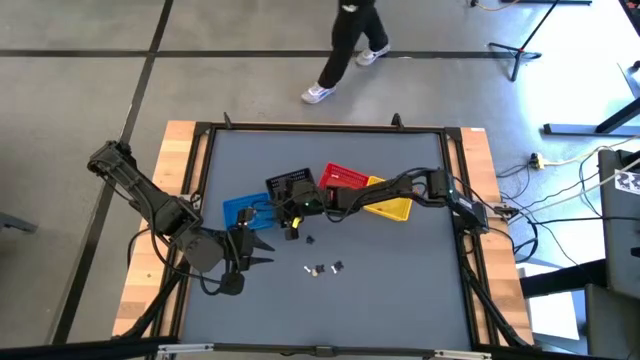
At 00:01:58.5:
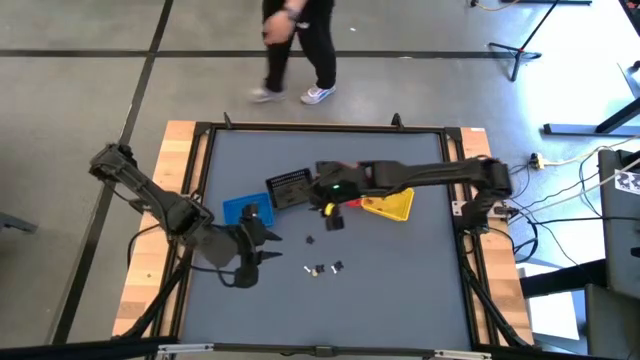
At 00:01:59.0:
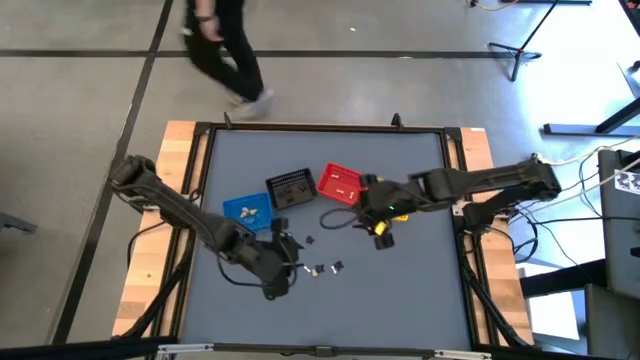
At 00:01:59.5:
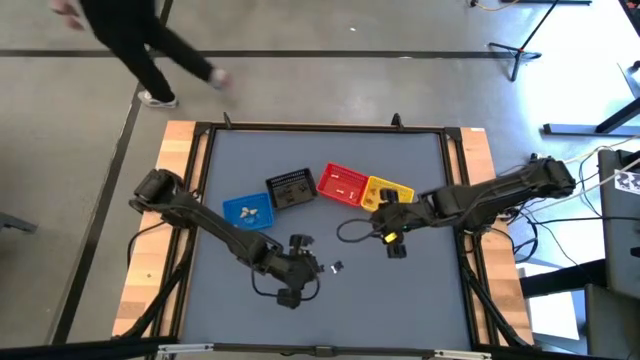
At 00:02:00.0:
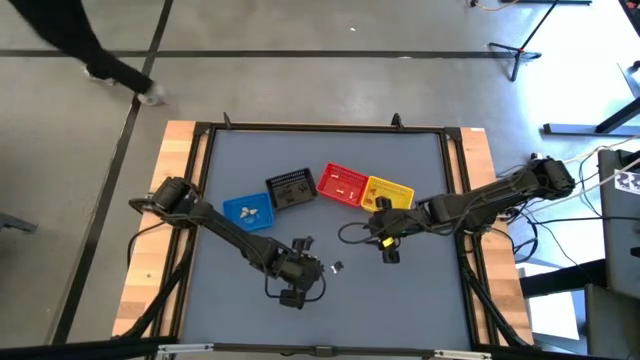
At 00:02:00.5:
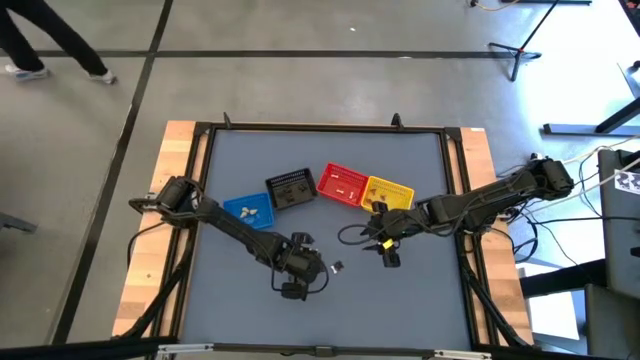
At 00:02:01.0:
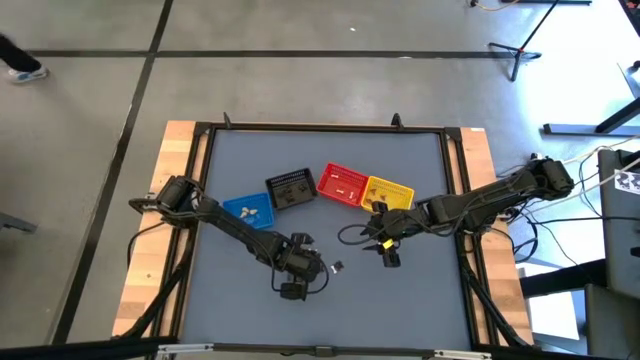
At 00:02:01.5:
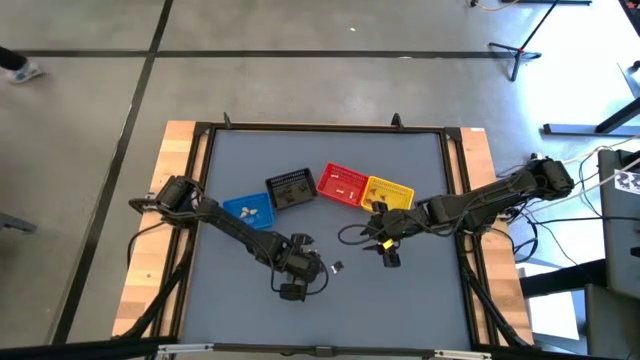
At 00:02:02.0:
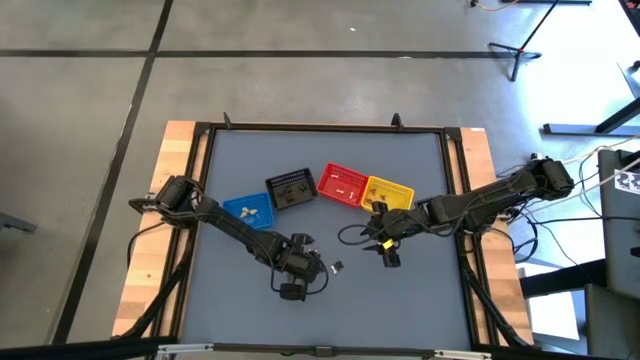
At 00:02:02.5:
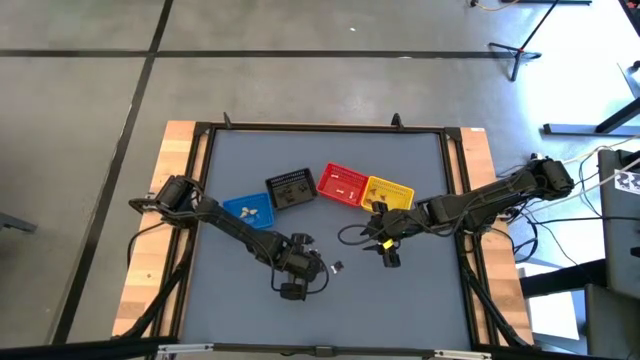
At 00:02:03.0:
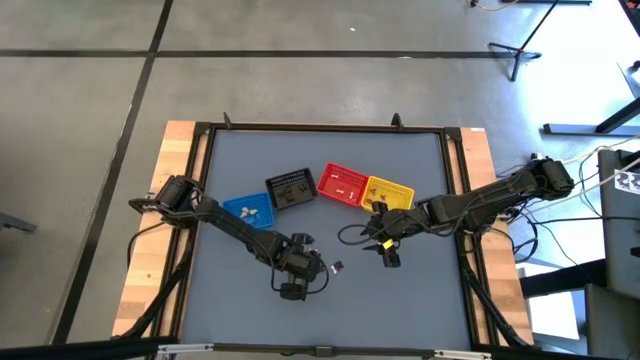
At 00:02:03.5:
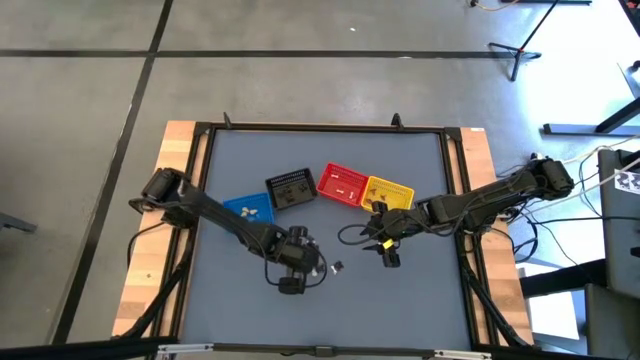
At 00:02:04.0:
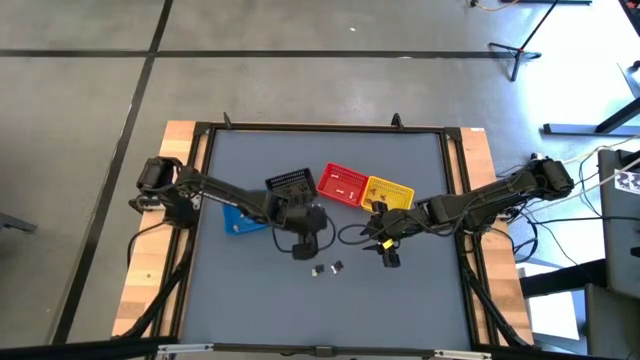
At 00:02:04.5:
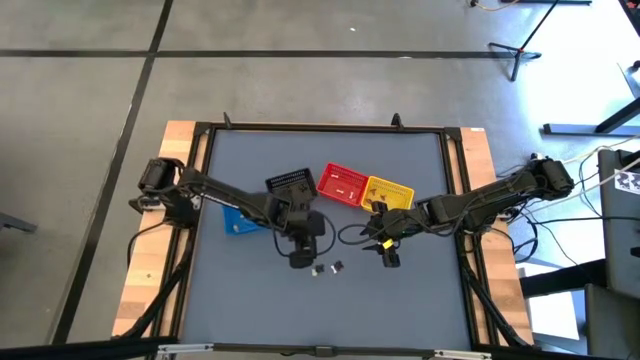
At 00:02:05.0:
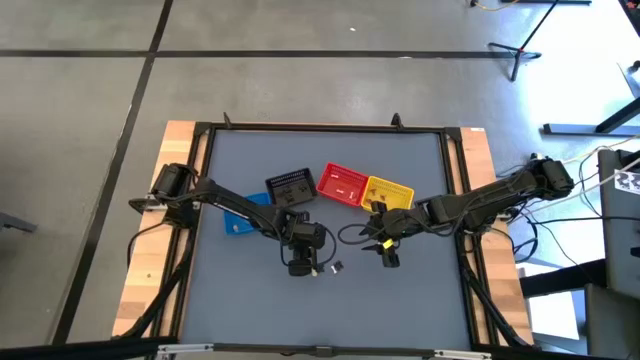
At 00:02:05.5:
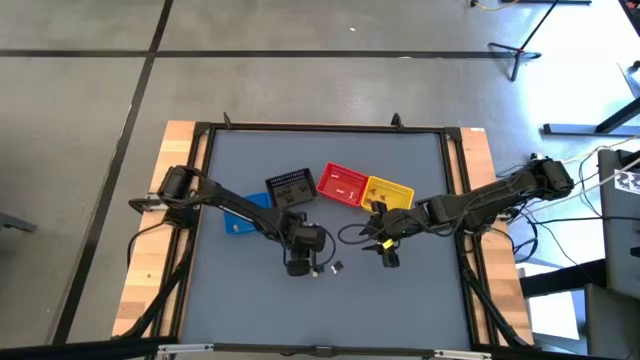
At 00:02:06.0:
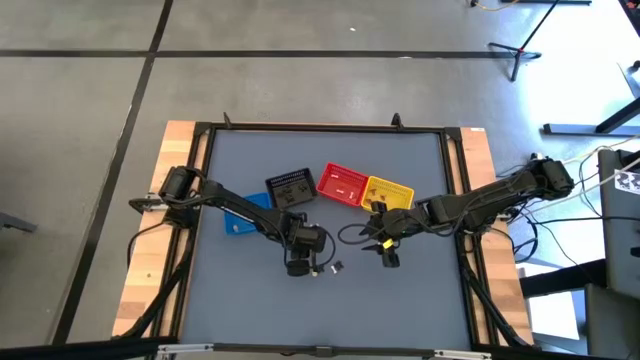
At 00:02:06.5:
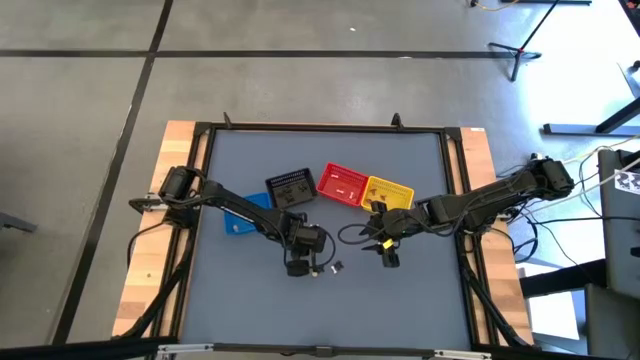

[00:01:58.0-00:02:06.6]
Task: Sort Halloween decoration
Put the white bone toy into the red bin

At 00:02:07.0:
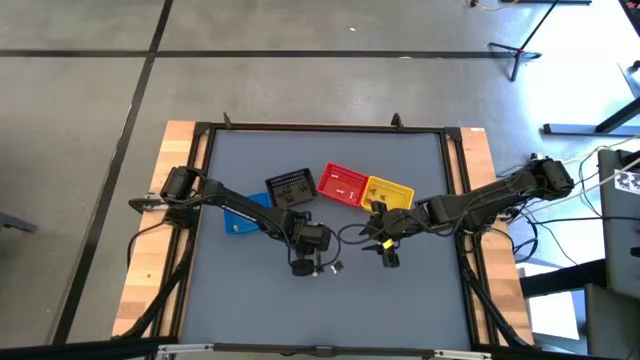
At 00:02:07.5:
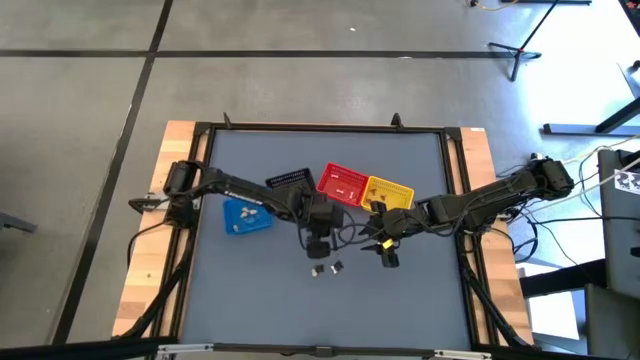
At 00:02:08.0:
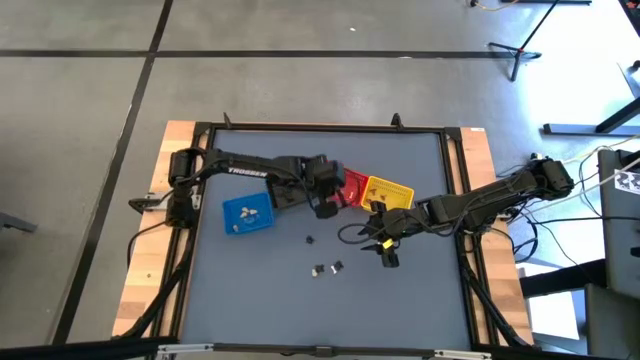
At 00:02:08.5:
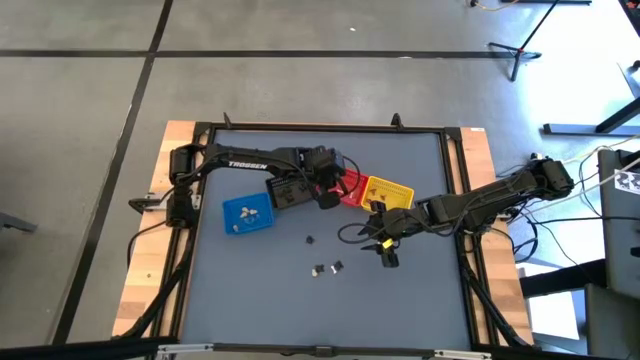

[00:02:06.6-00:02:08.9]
Put the white bone toy into the red bin

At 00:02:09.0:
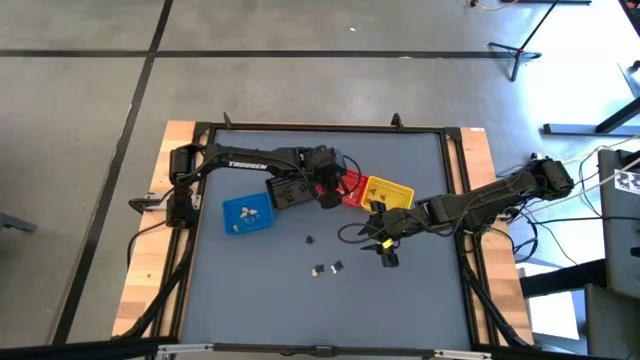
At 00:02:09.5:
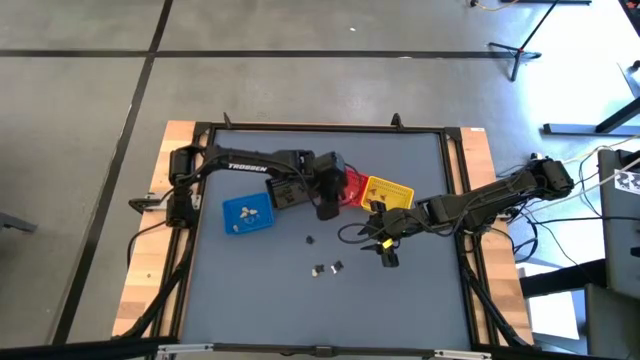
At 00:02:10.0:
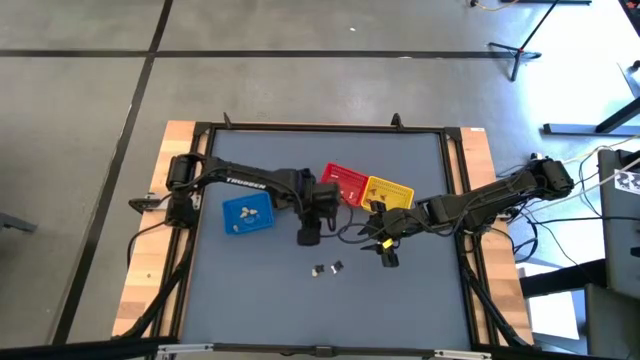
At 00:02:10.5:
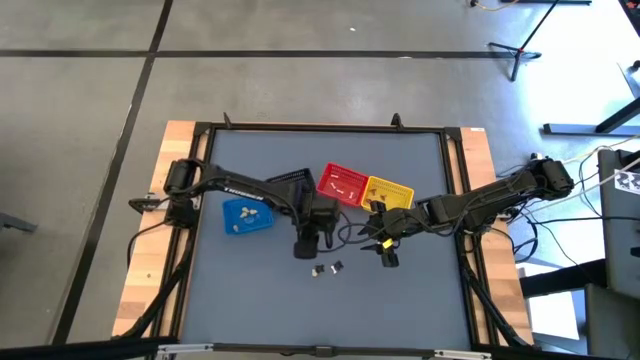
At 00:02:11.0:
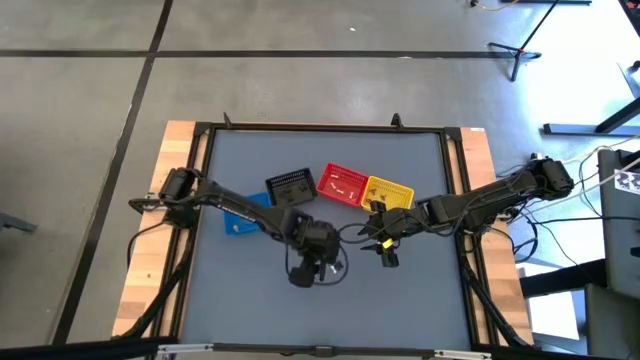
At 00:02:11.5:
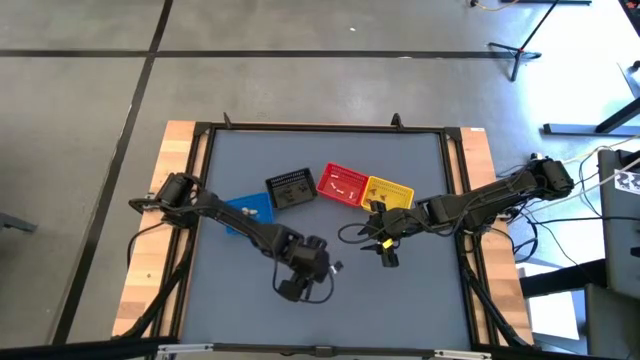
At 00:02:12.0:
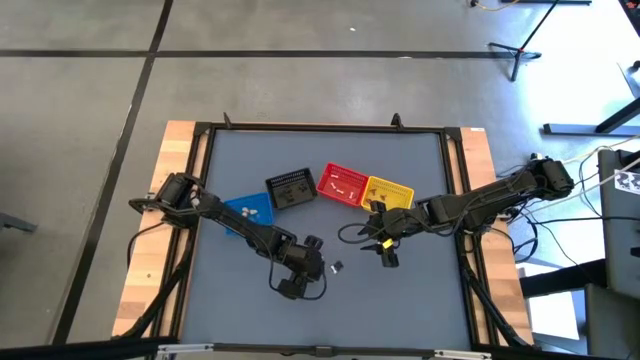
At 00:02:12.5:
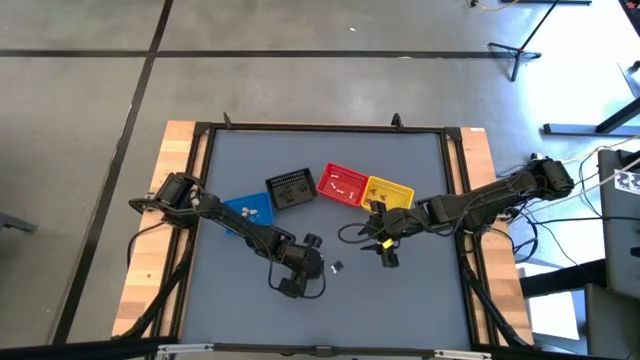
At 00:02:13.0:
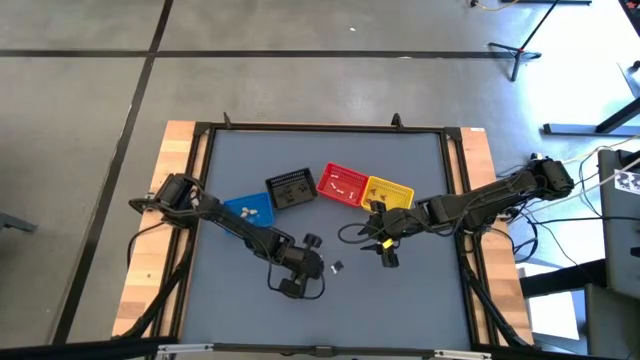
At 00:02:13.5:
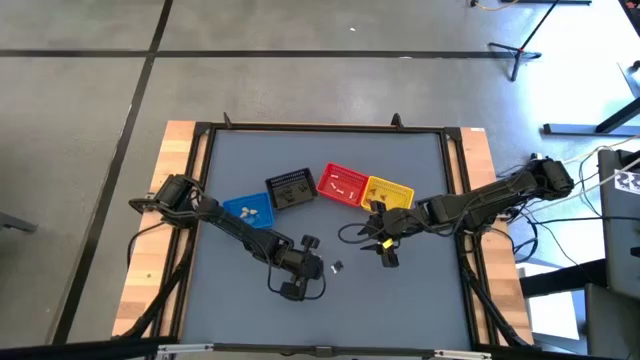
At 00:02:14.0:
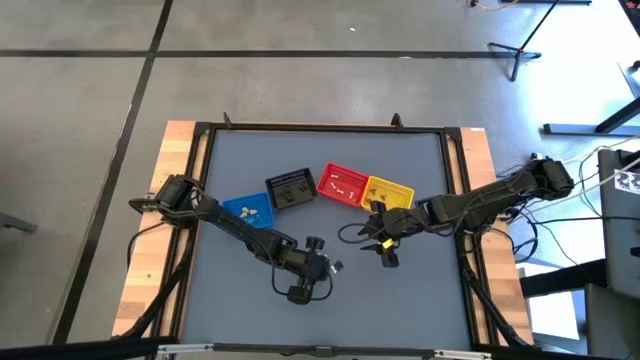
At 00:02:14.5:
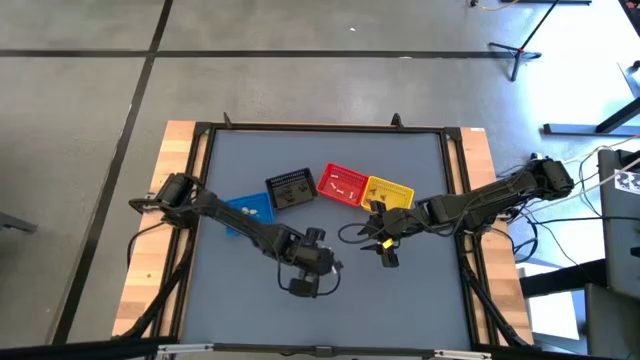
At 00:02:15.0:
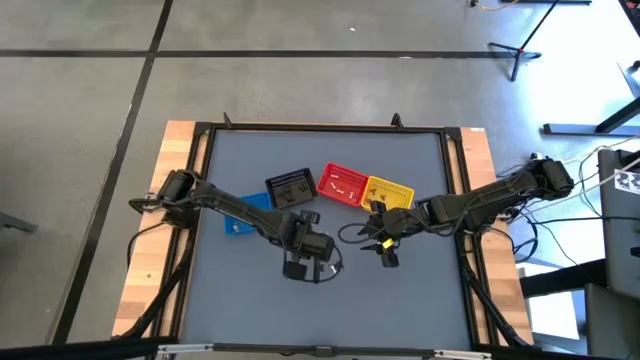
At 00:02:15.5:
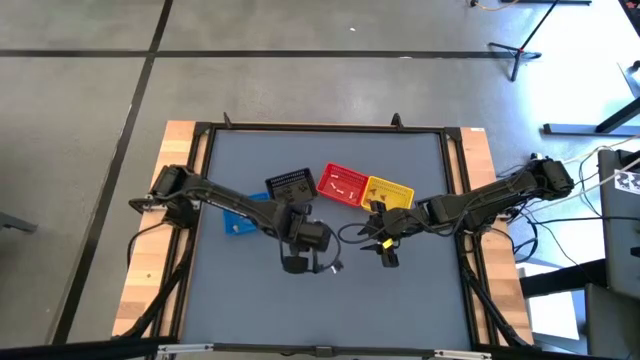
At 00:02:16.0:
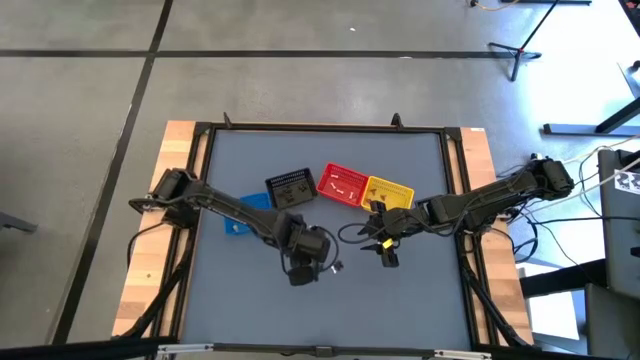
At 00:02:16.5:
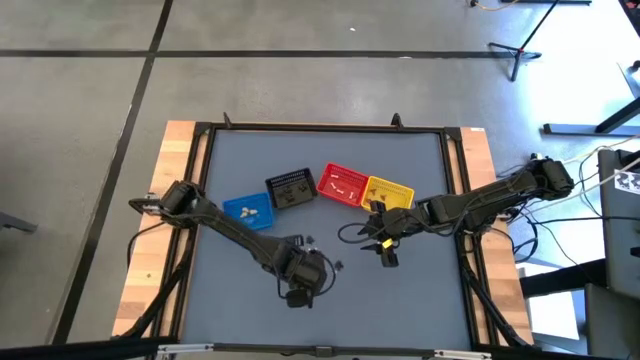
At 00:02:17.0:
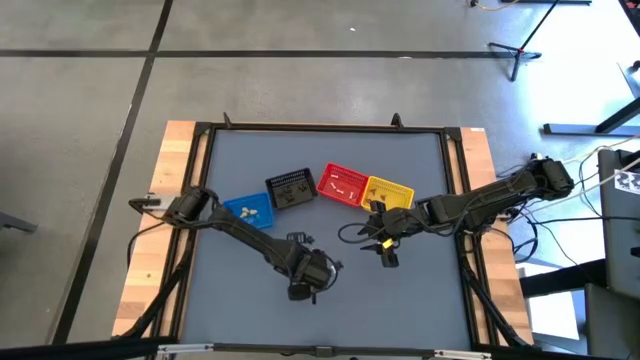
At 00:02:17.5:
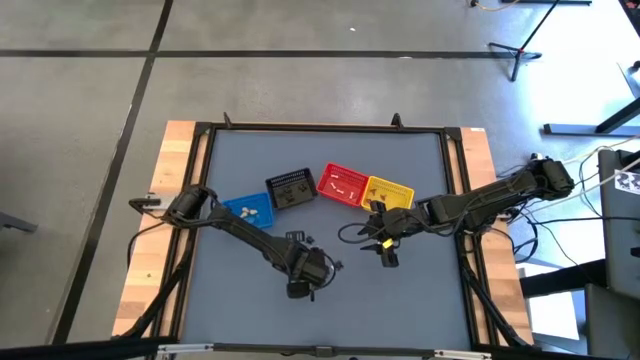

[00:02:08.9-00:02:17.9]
Put the yellow skull toy into the blue bin

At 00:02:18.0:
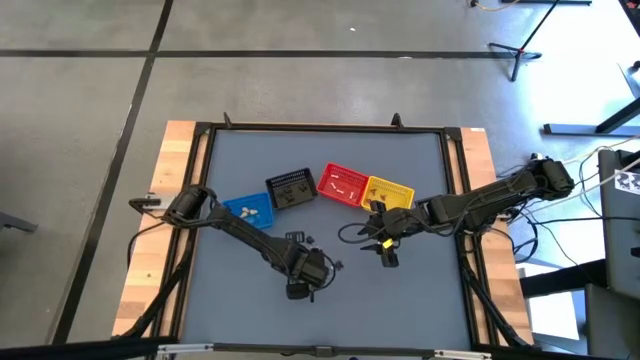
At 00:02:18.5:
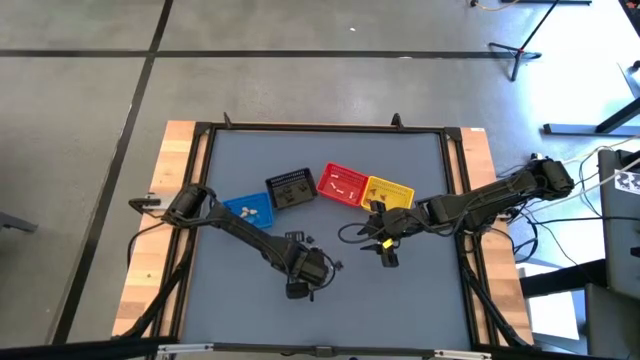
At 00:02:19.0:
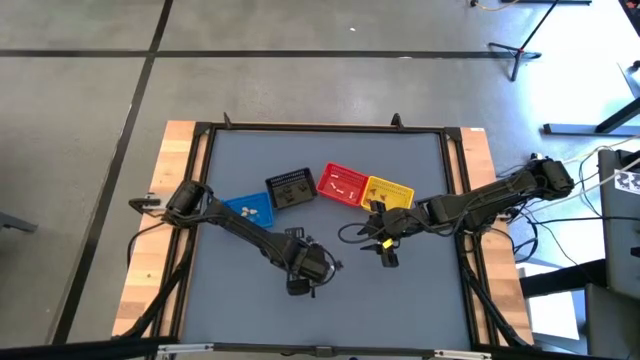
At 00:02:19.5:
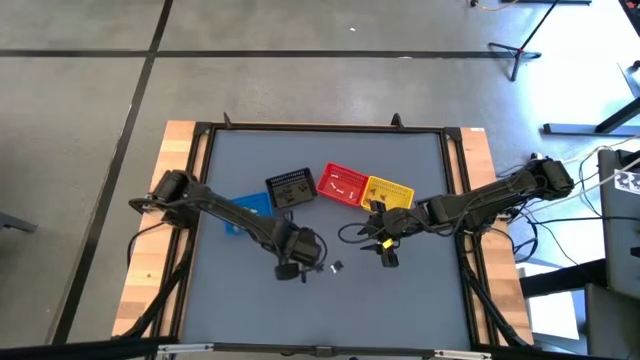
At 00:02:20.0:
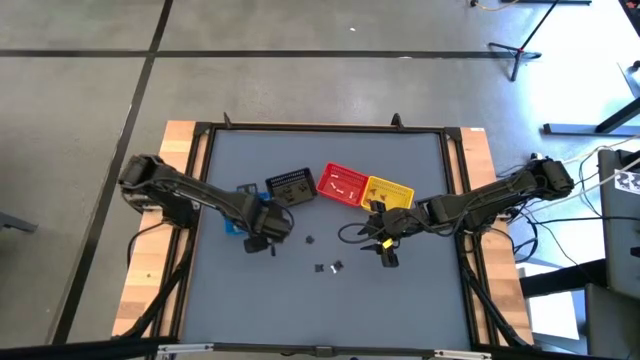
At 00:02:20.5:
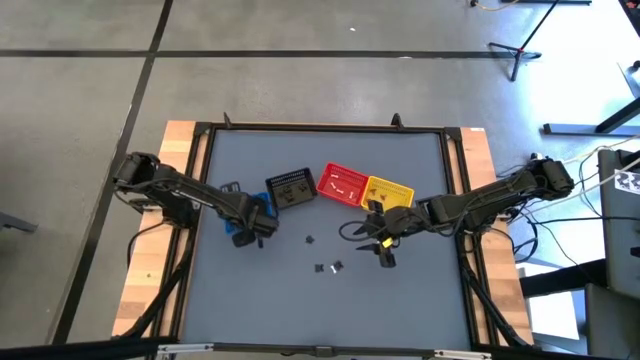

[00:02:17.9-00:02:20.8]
Put the yellow skull toy into the blue bin
